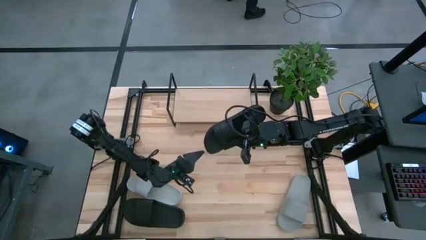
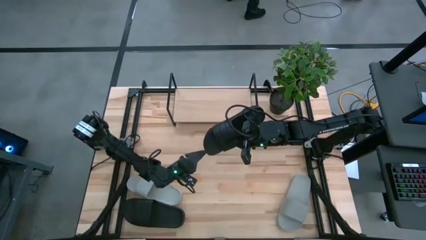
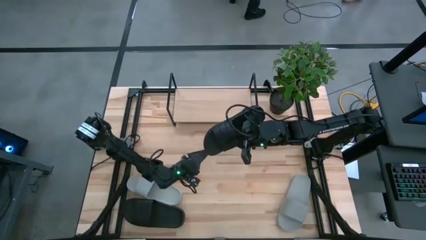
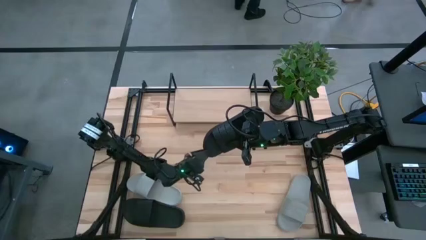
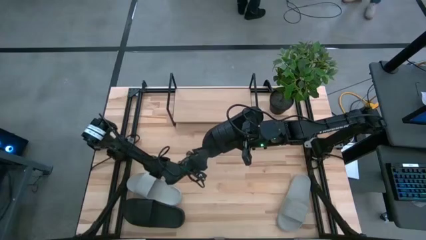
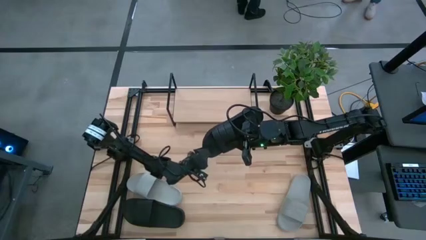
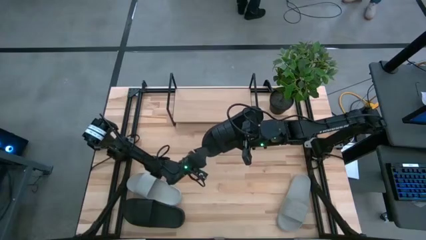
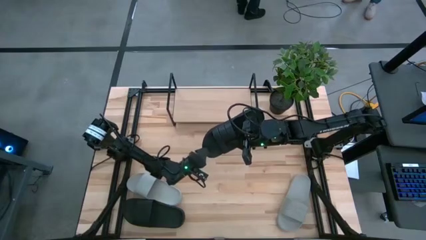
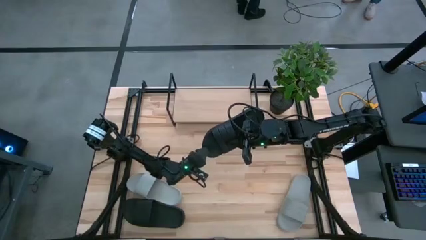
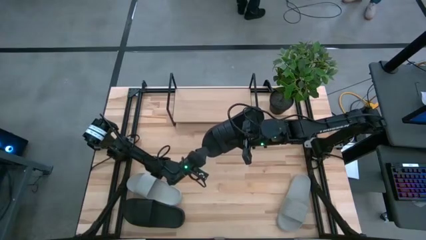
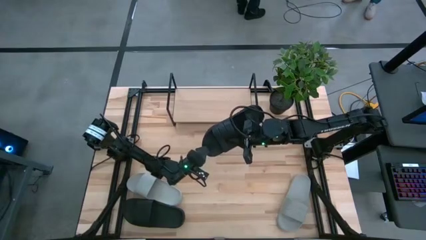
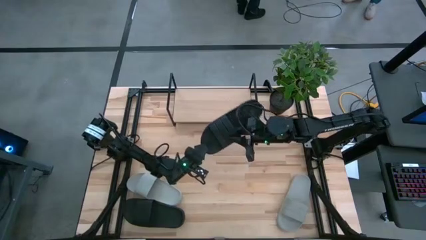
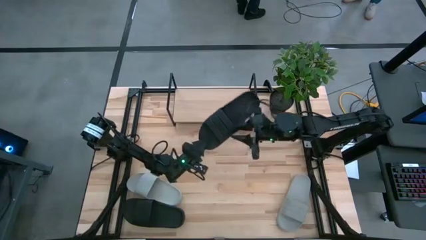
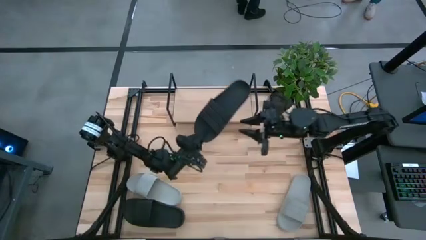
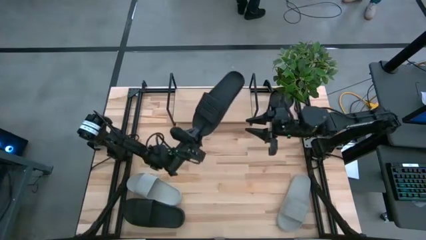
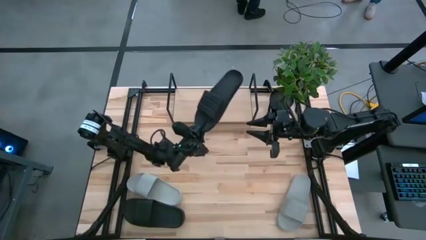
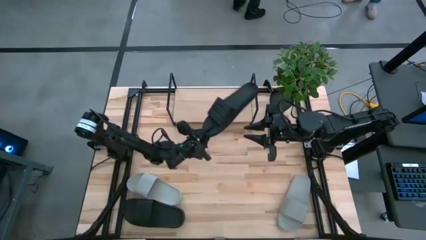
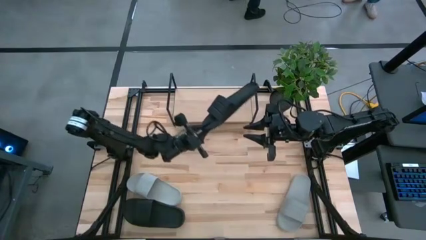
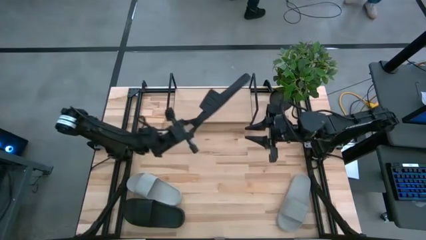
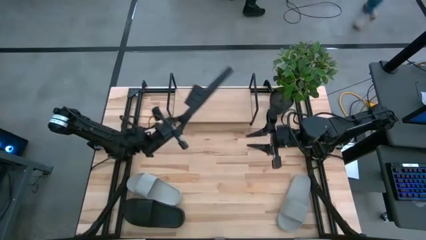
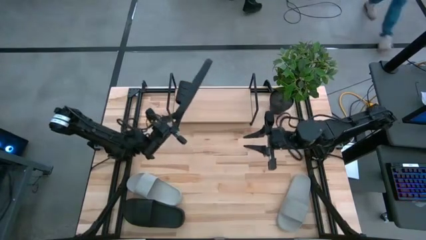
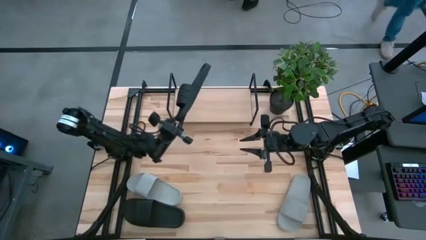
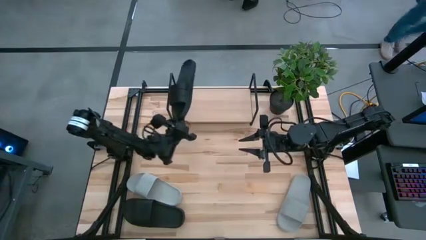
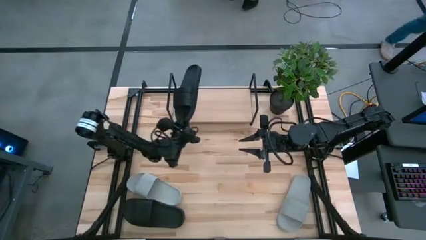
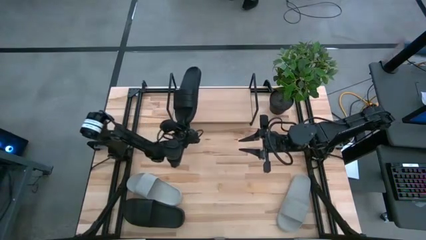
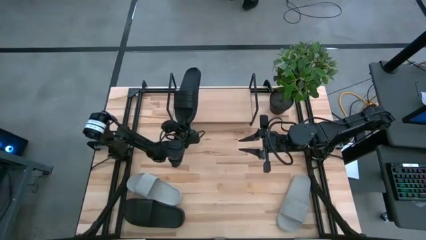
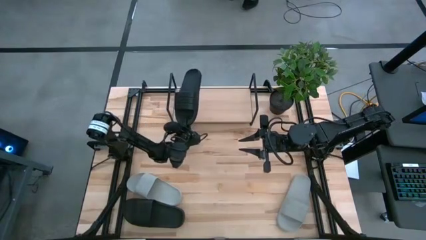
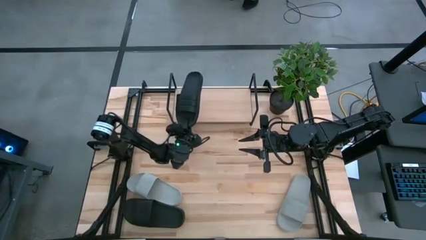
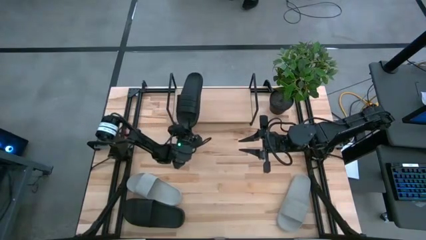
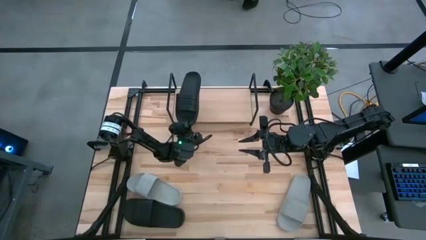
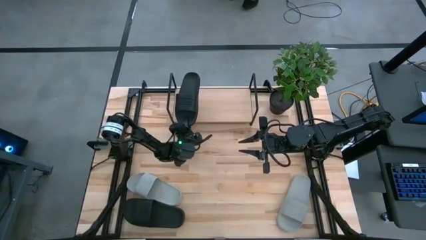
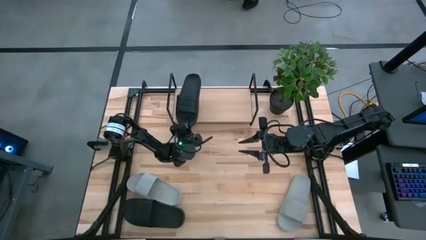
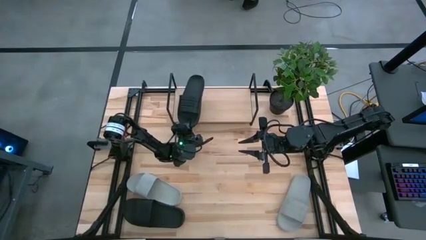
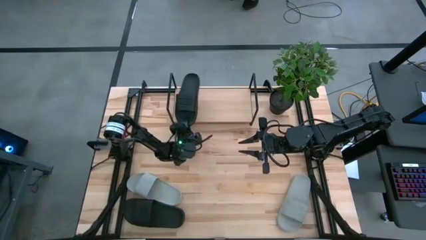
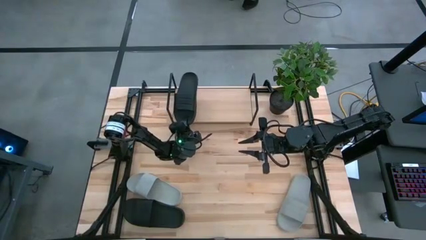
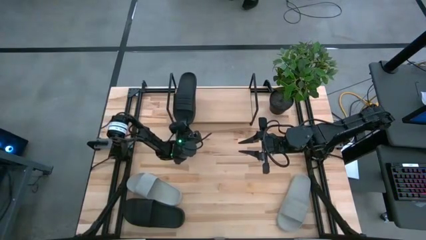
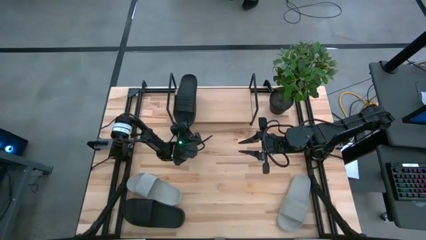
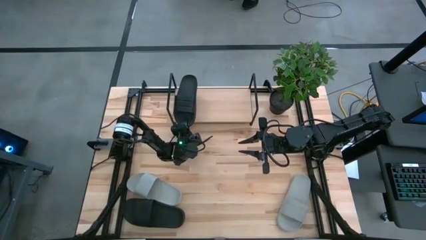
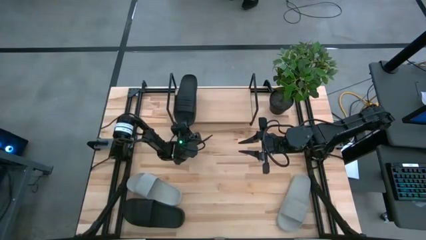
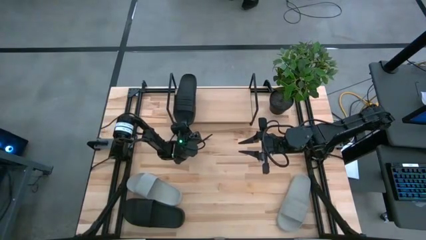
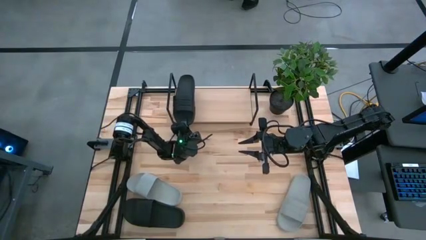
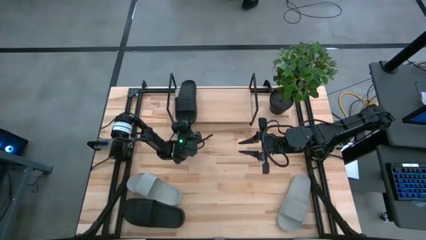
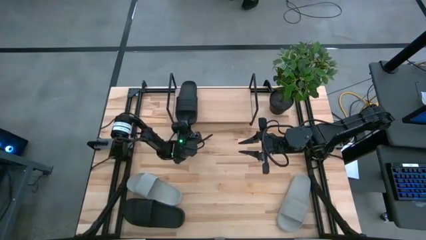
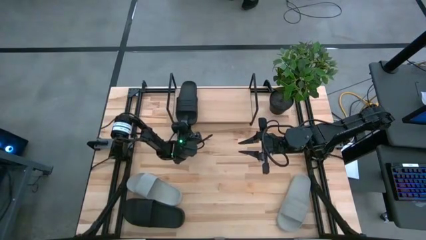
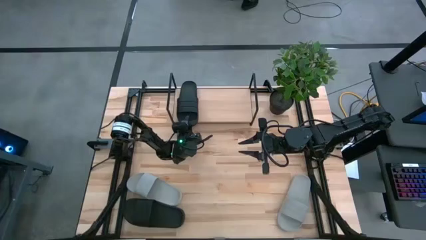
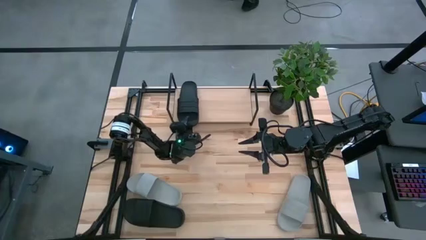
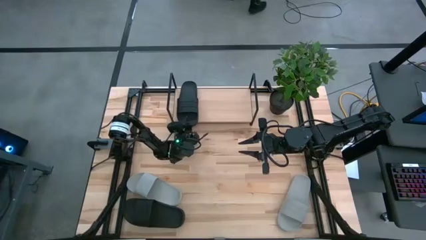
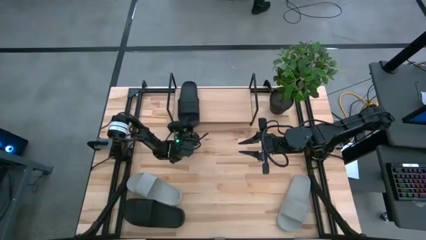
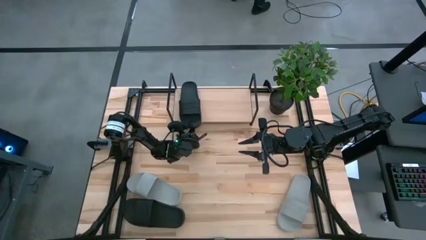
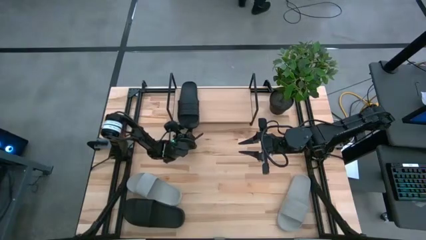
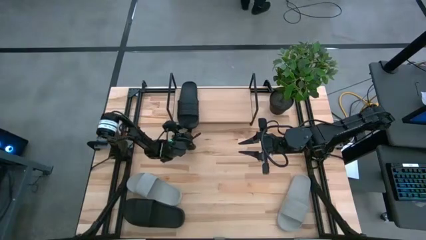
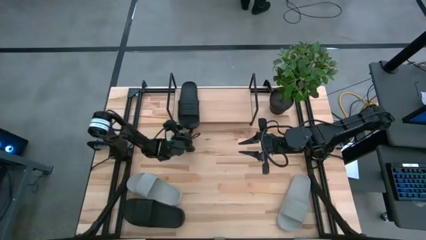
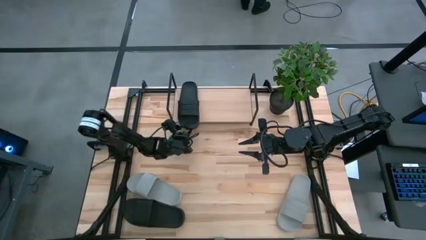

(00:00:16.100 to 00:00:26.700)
Task: Pick and place slides into the shelf
Put the right black slipper on the shelf

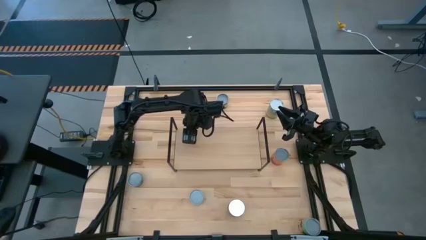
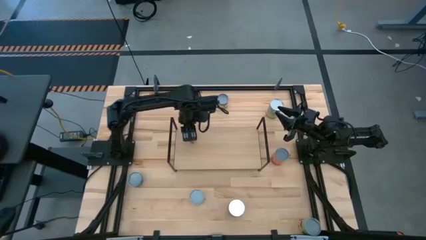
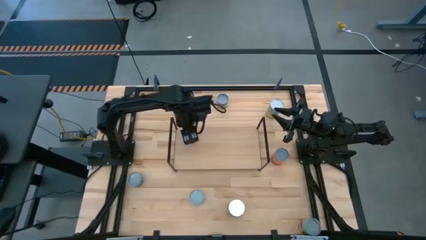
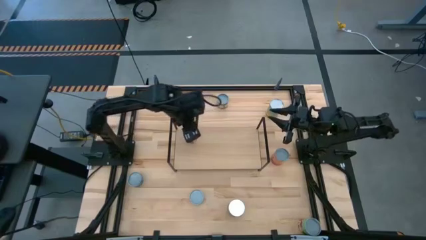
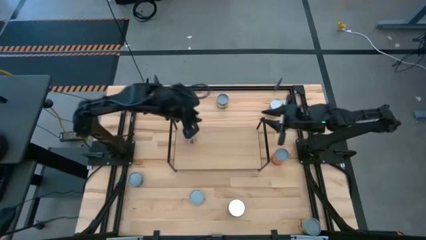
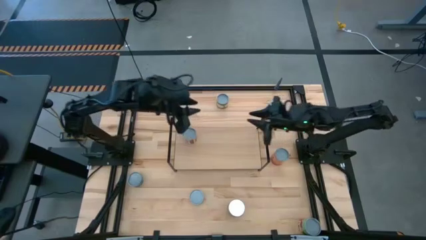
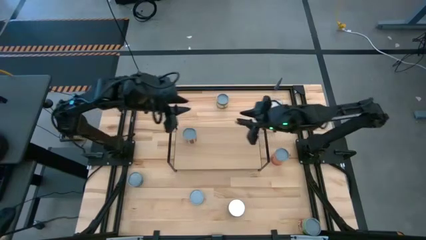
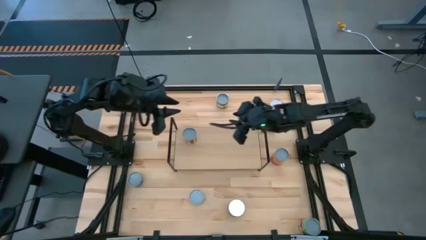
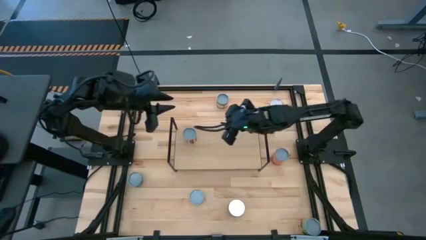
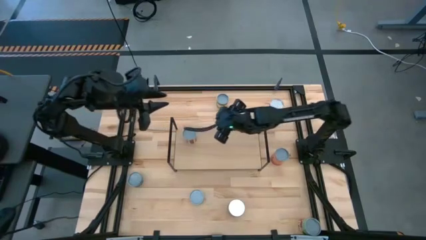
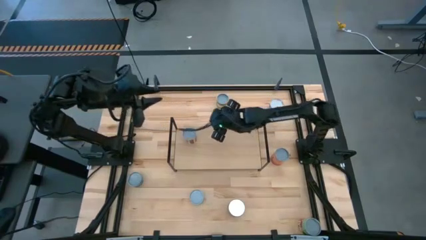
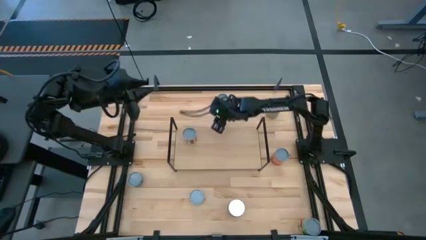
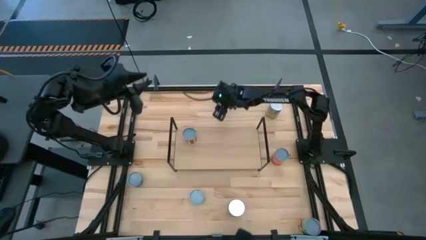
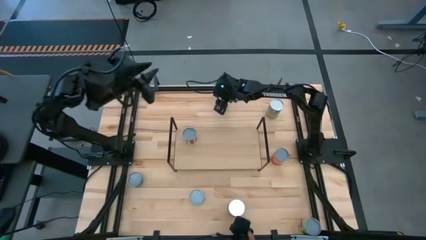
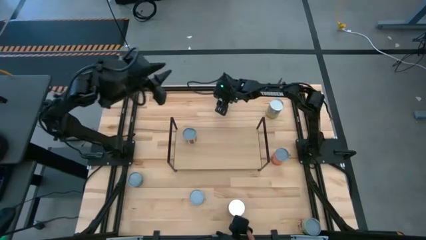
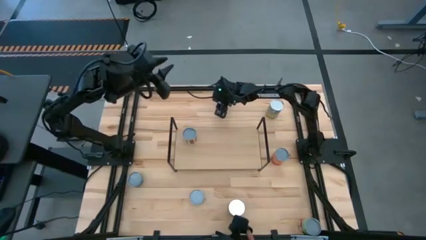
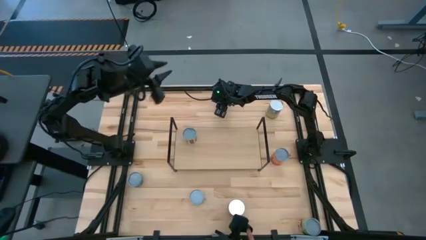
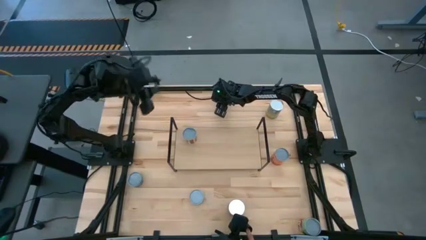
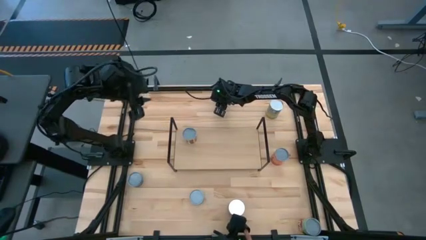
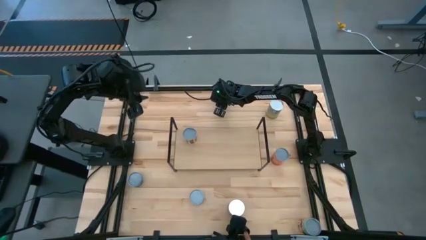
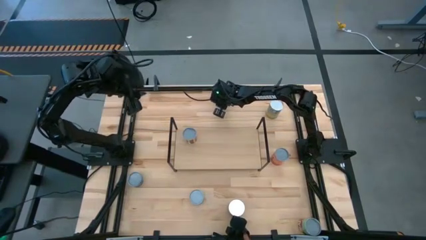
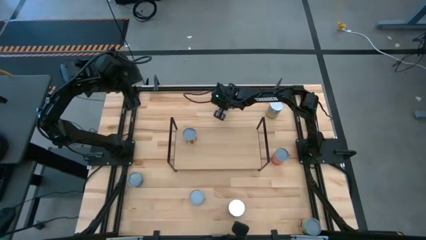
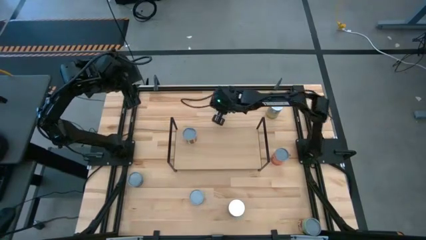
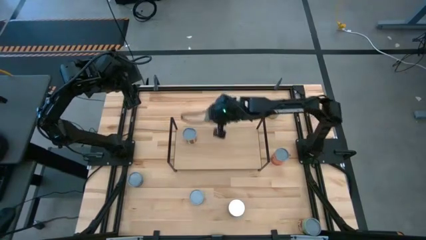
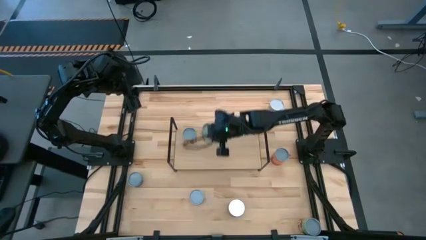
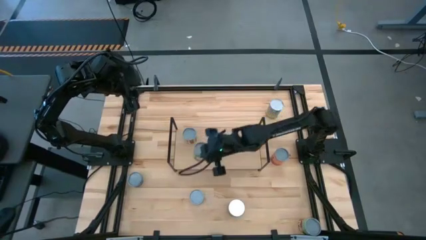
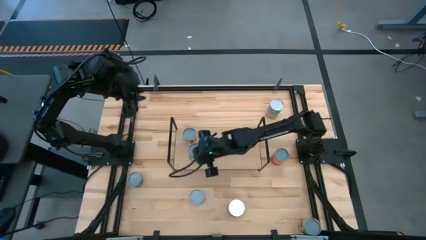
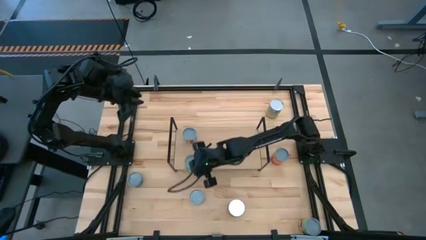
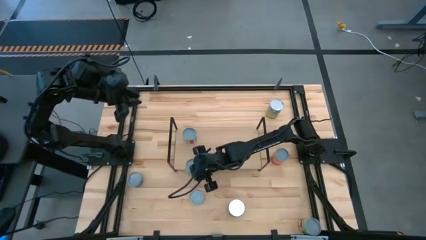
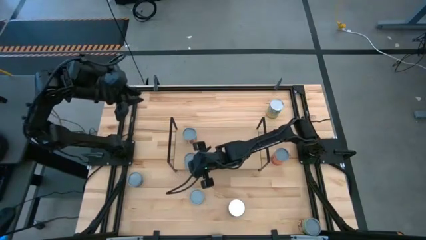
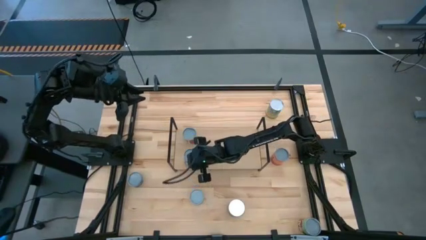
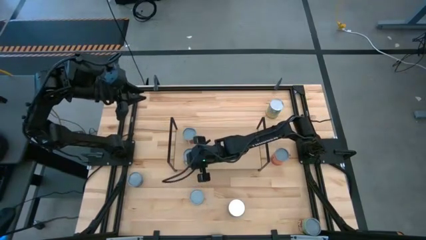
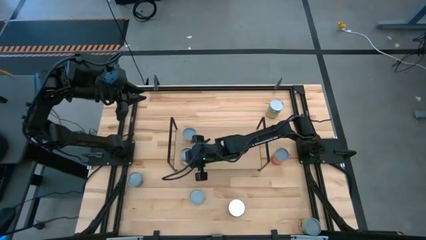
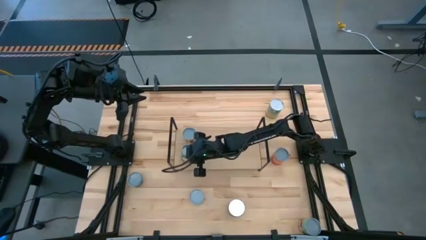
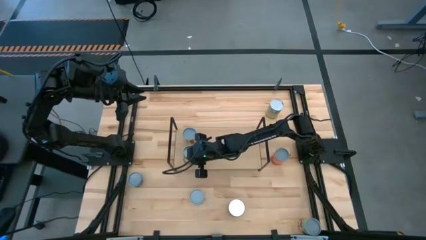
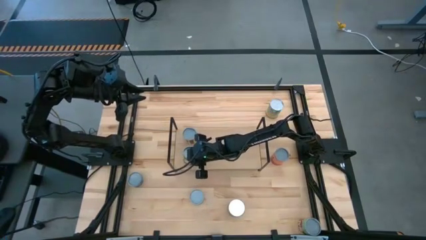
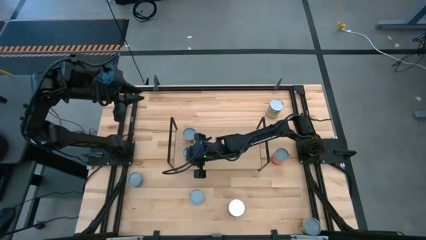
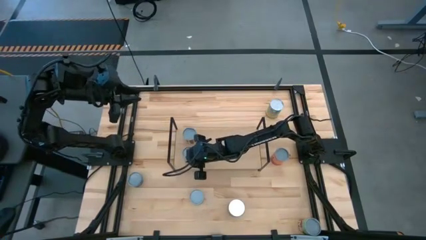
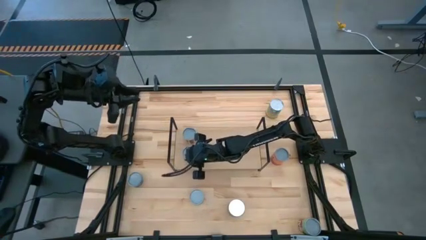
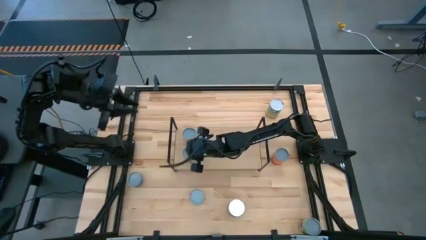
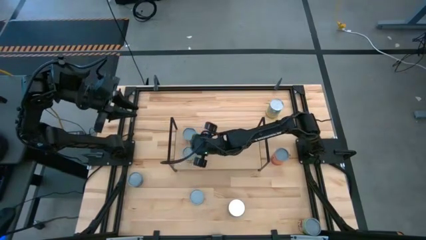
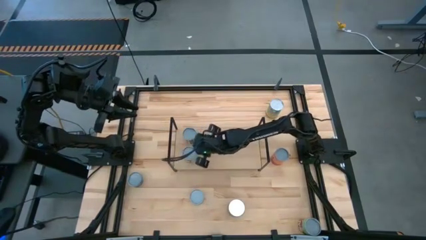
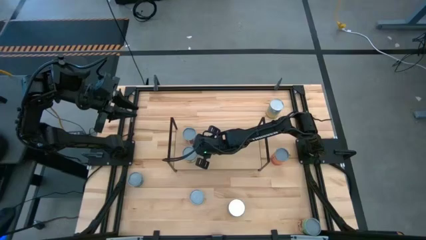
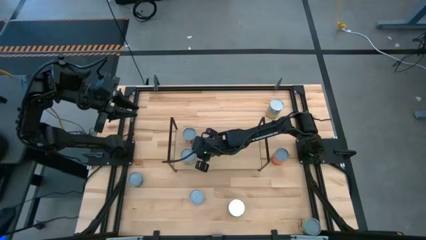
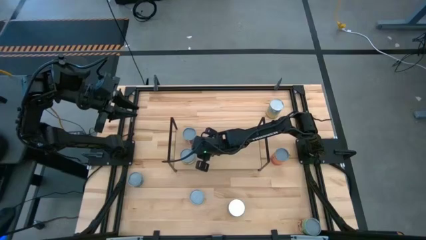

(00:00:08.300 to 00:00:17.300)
Task: Pick and place cans onto a shelf
Put the canned peaches on the shelf
